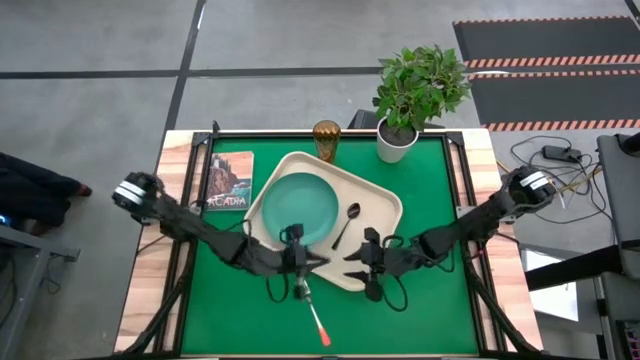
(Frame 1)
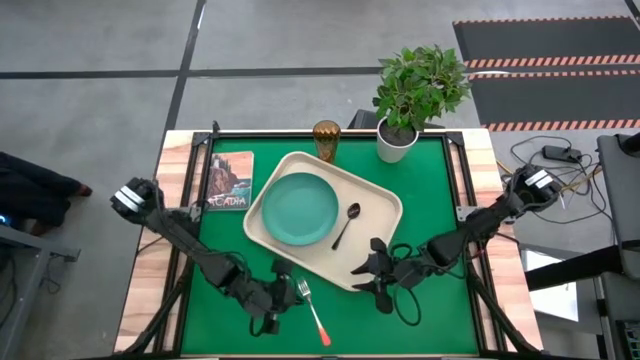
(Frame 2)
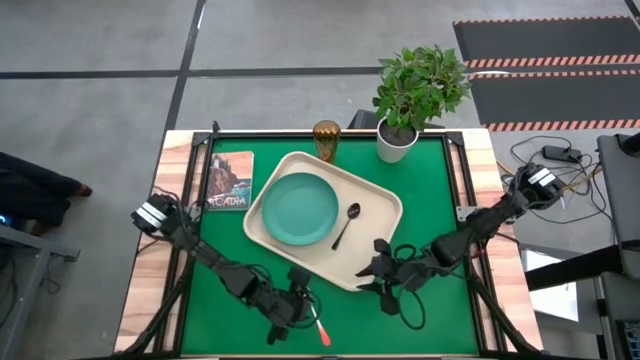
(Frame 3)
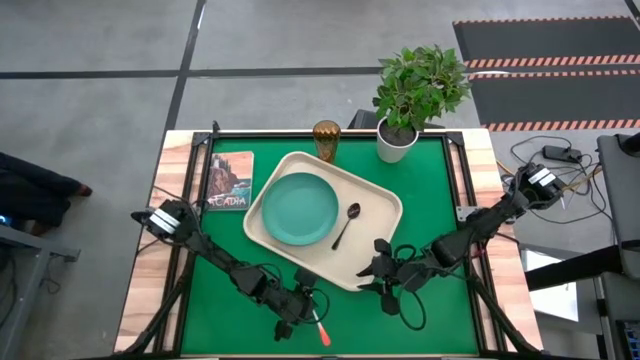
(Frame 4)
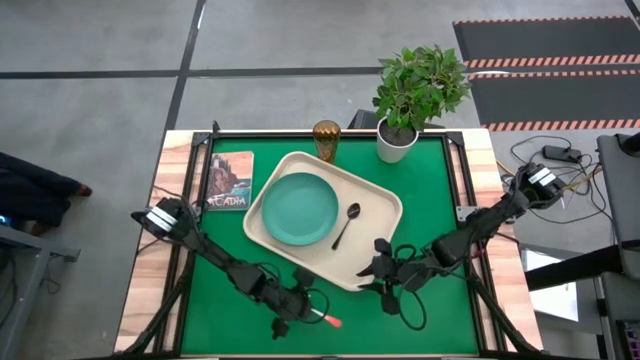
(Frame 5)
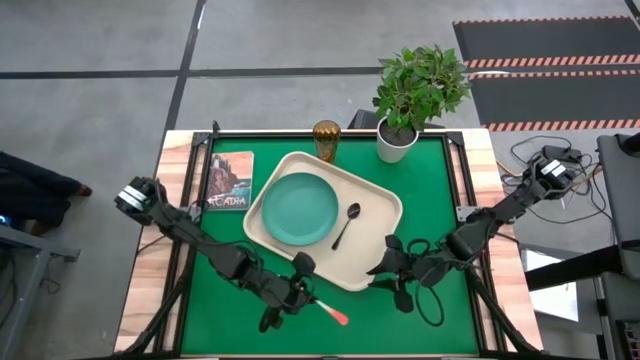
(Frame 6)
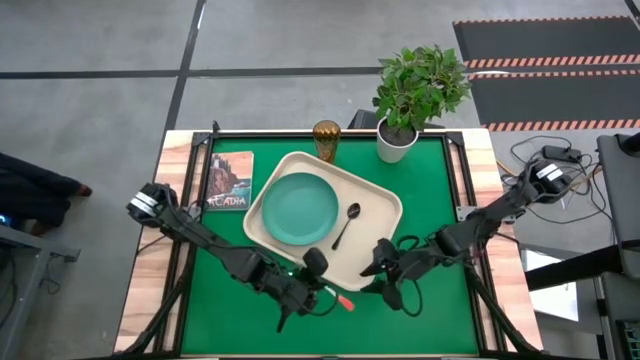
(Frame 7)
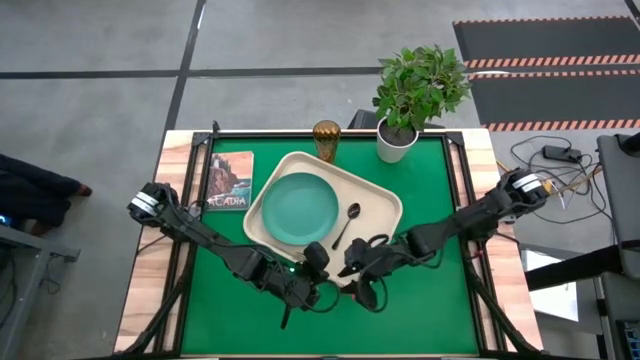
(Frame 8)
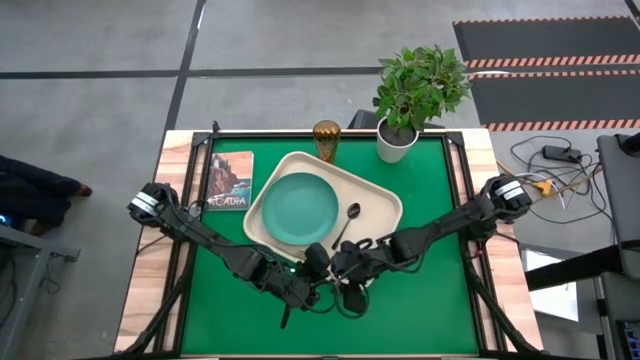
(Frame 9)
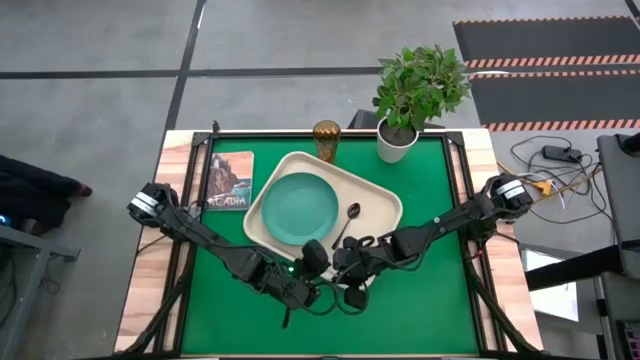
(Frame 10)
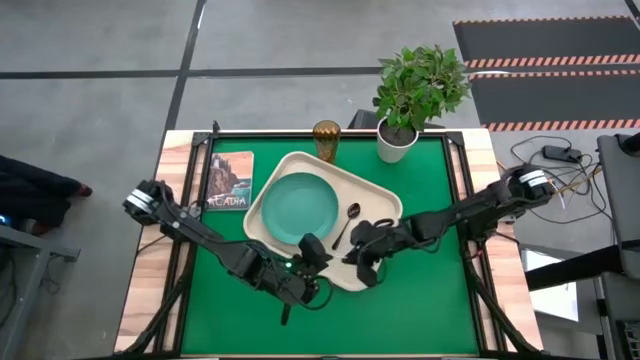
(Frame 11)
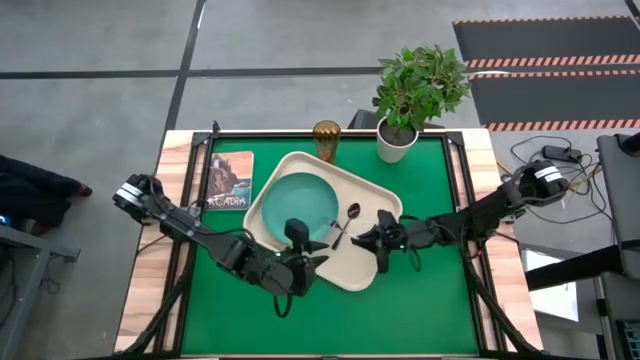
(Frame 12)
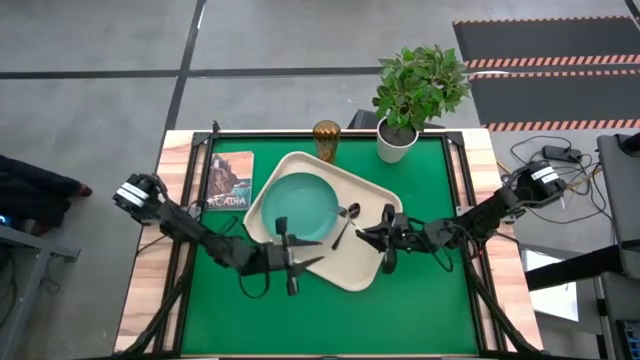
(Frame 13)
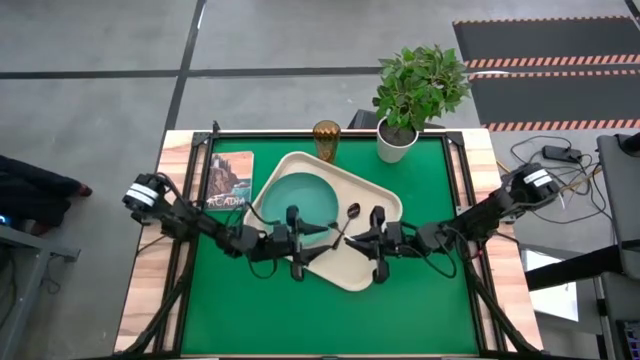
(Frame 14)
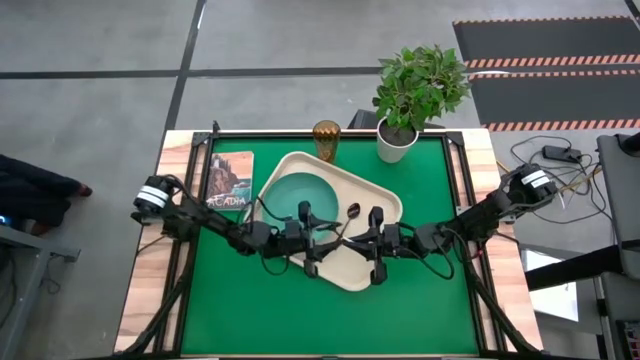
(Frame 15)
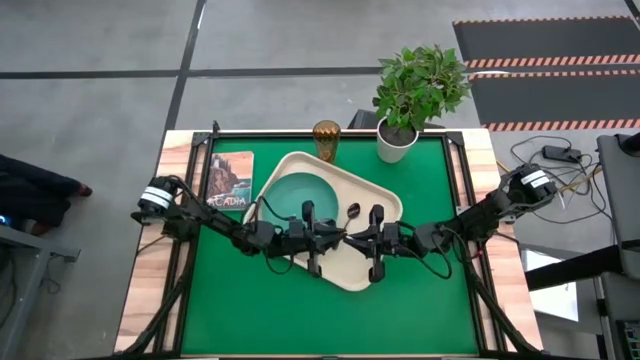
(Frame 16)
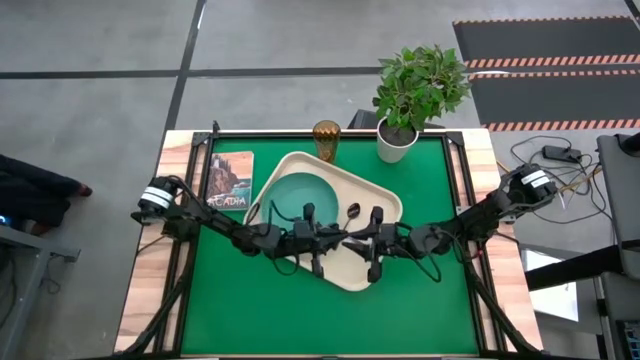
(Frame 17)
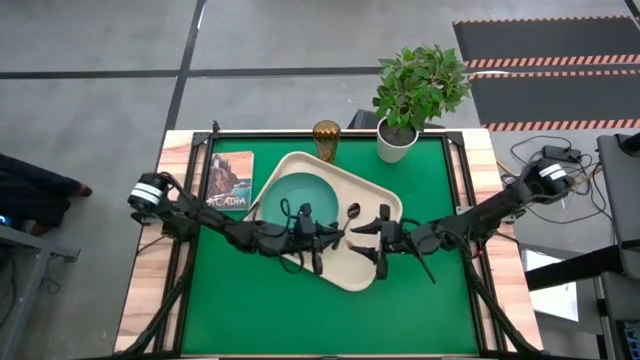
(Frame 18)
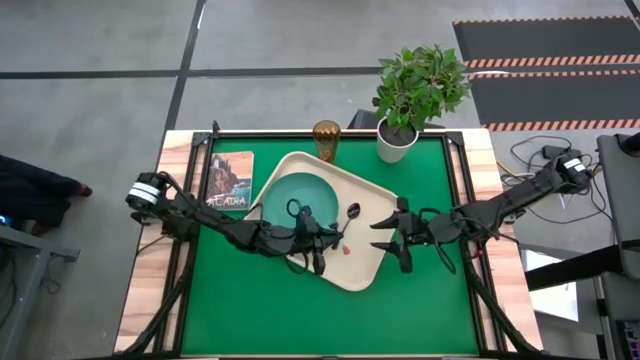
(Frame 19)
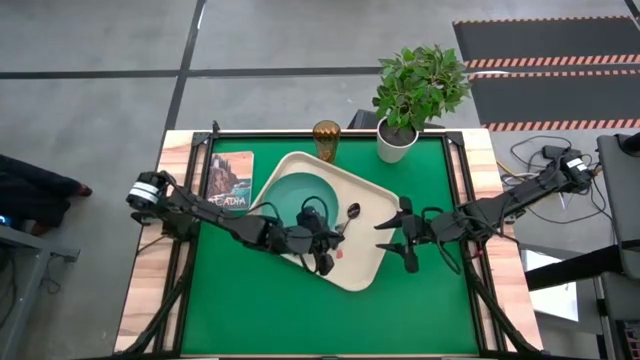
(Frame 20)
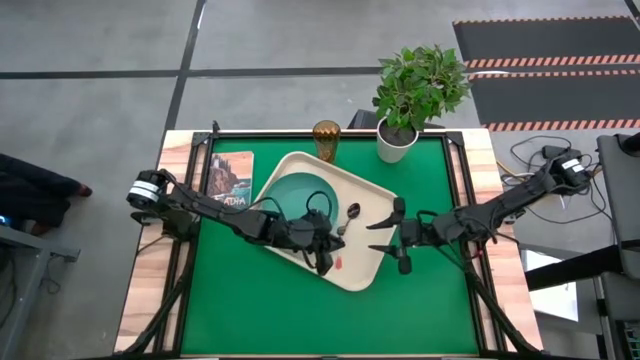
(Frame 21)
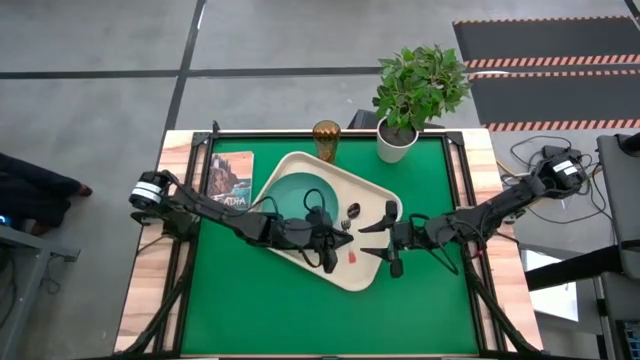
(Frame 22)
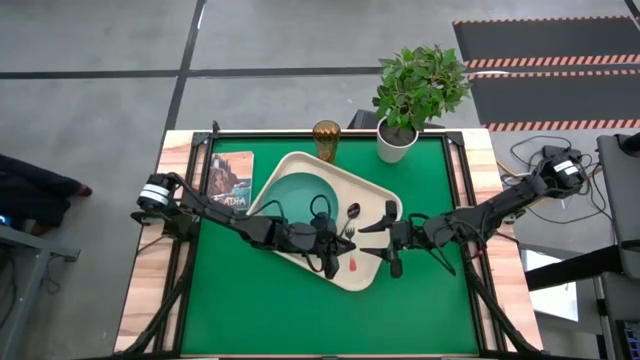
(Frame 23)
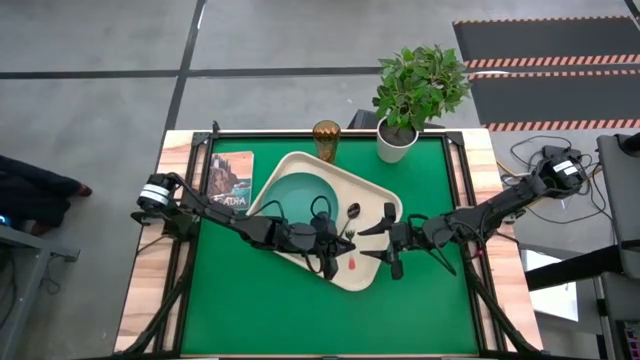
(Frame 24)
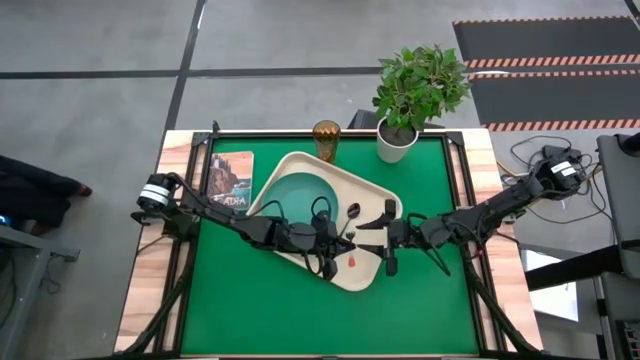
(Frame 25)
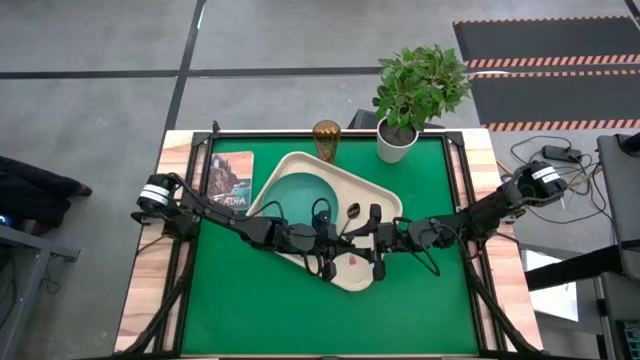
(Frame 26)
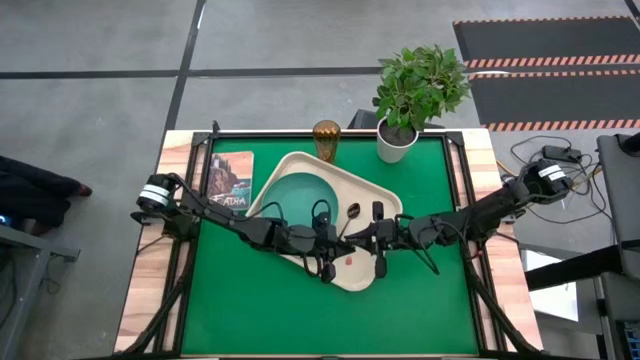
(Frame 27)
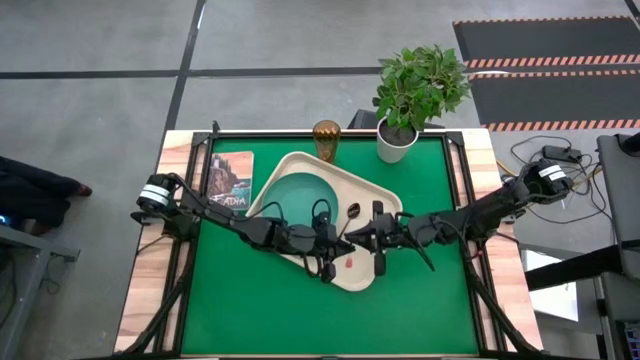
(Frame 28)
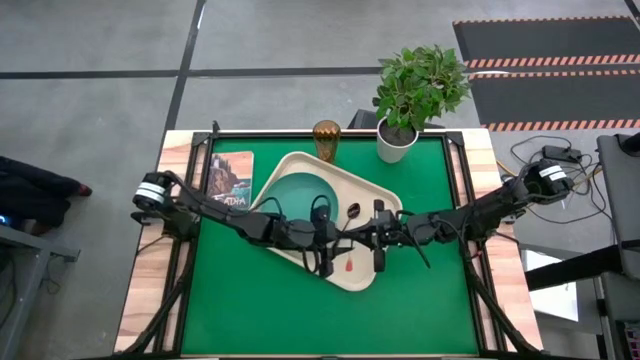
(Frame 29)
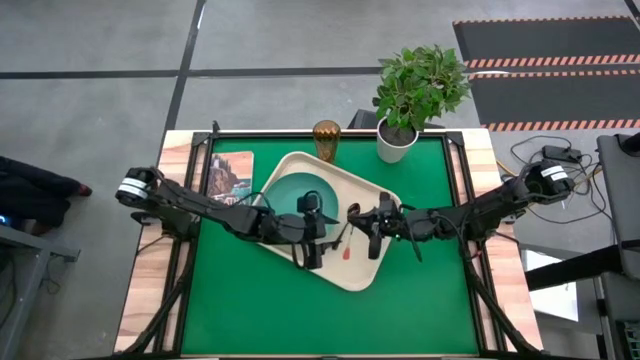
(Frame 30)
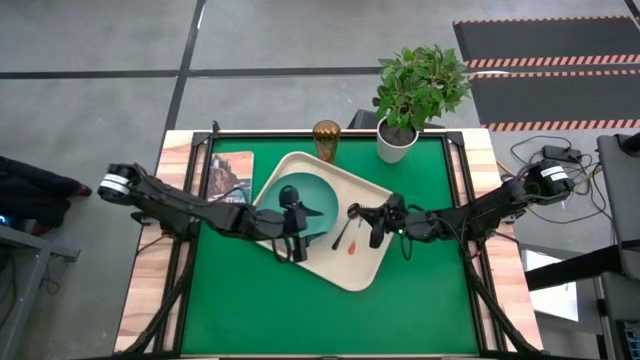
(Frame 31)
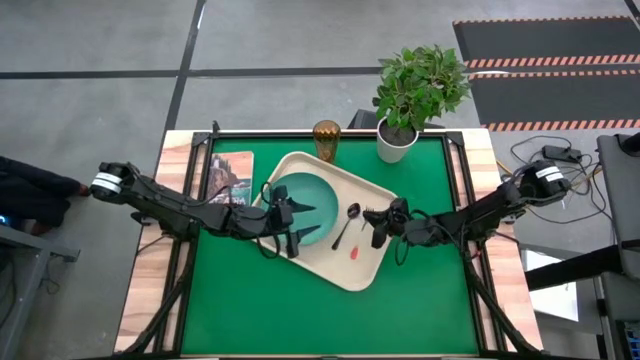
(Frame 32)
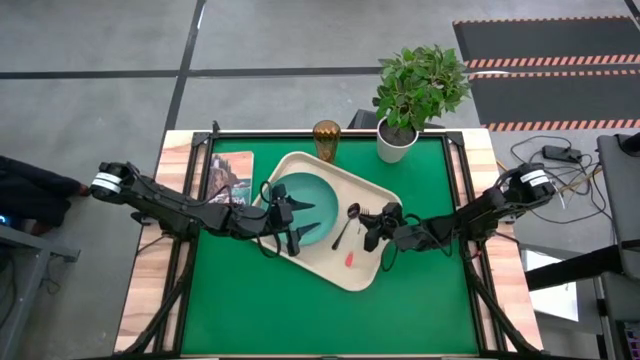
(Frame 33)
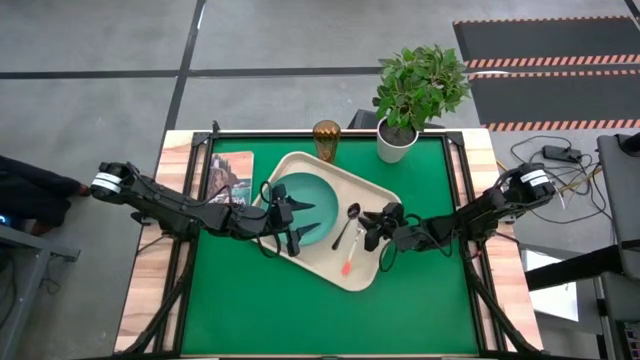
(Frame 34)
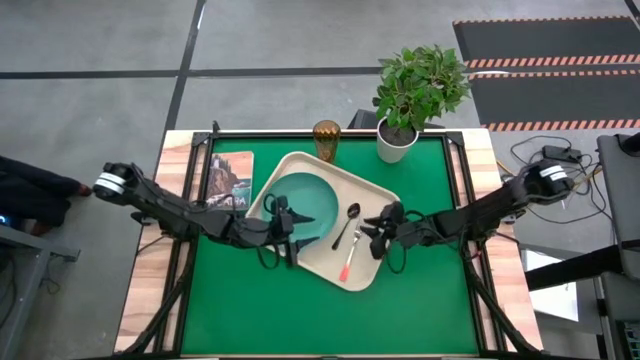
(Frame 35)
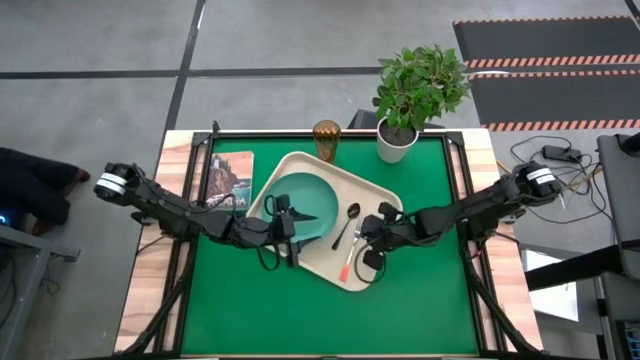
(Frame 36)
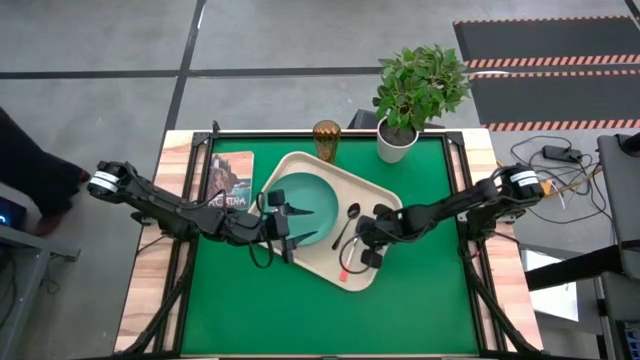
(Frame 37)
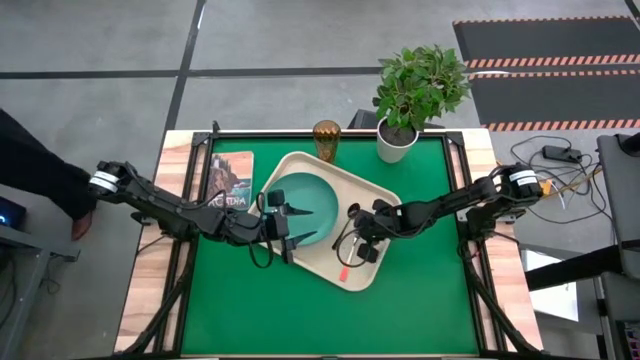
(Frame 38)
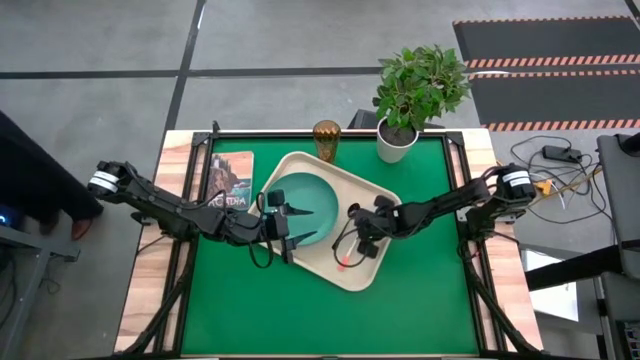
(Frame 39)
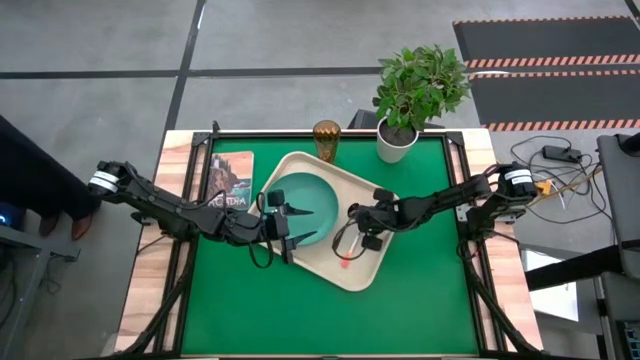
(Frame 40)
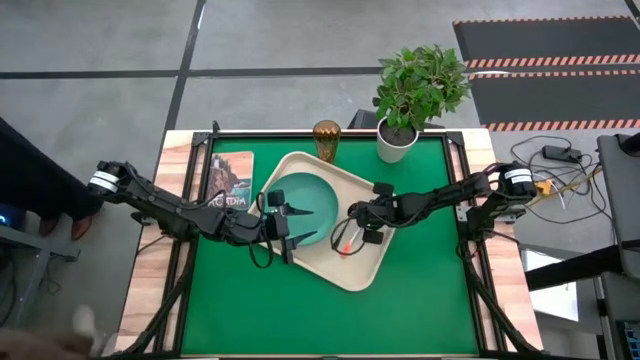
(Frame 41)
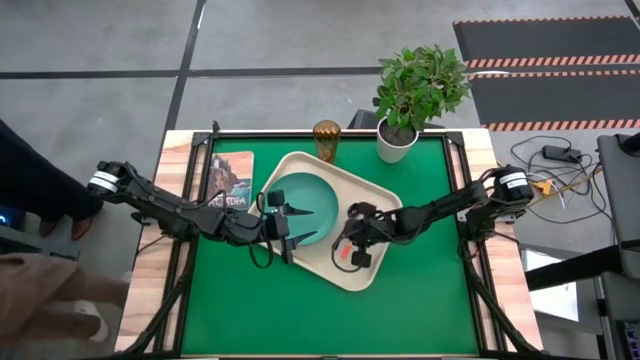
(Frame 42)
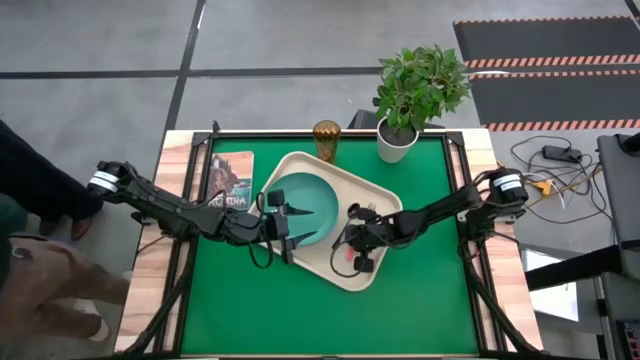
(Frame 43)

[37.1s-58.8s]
Task: Pick and place plate/cup/fork/spoon on tray
Put the white orange fork on the right side of the black spoon
